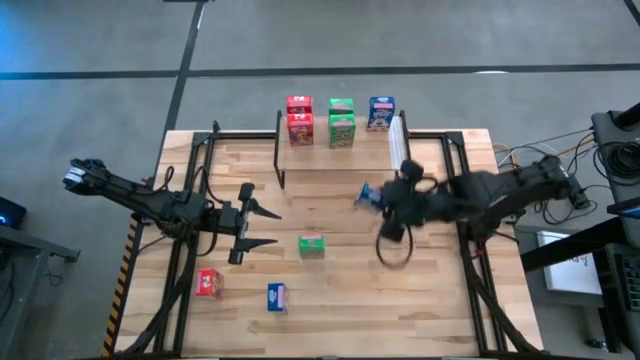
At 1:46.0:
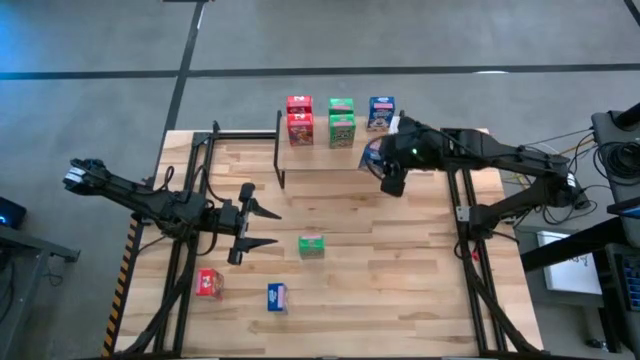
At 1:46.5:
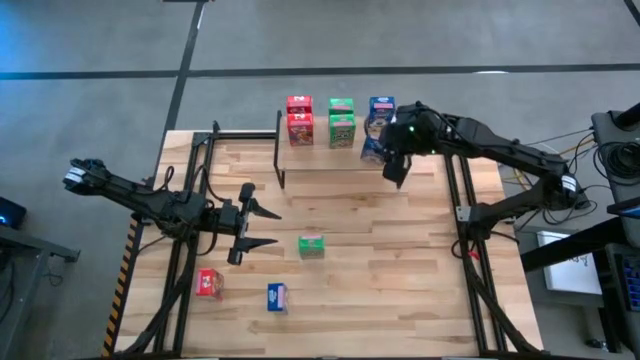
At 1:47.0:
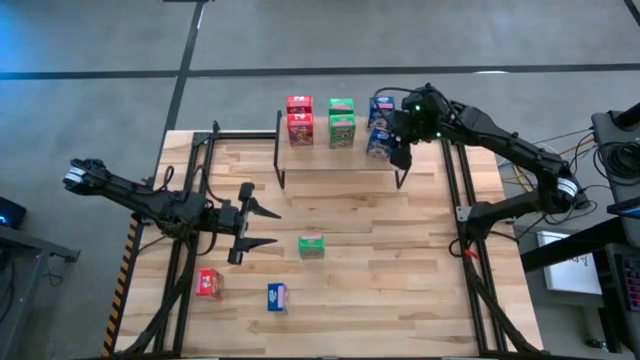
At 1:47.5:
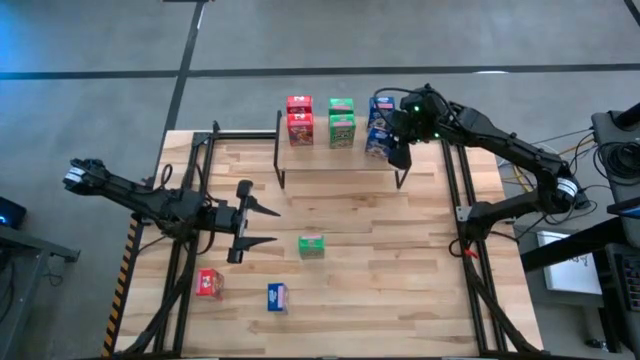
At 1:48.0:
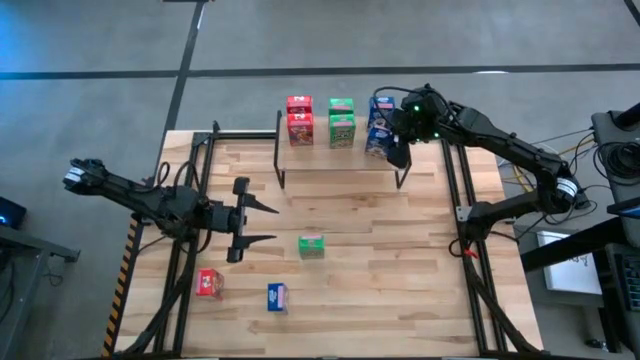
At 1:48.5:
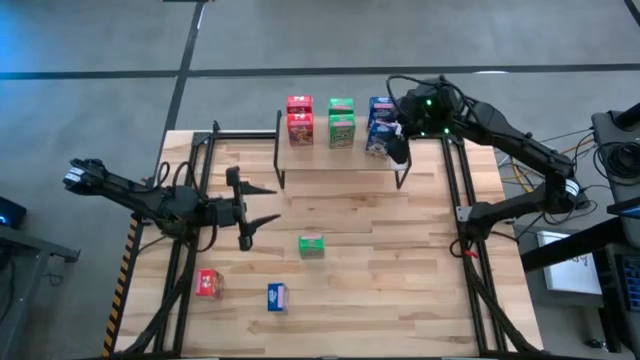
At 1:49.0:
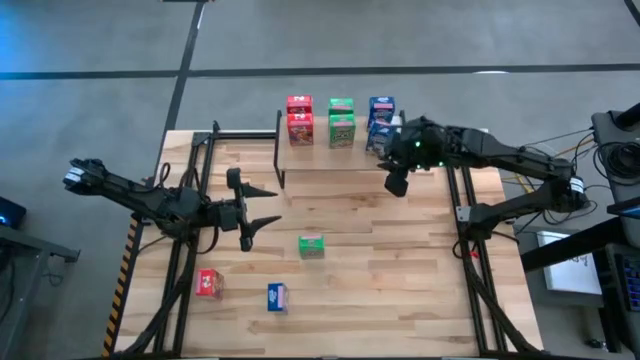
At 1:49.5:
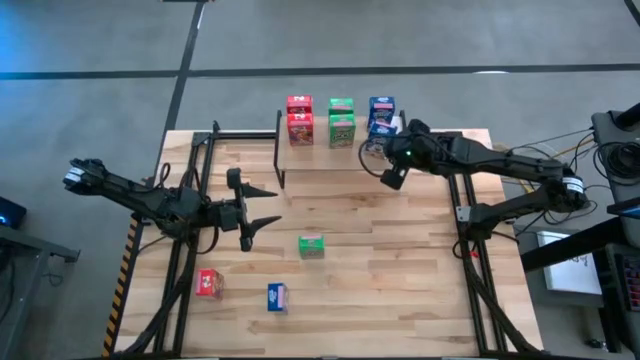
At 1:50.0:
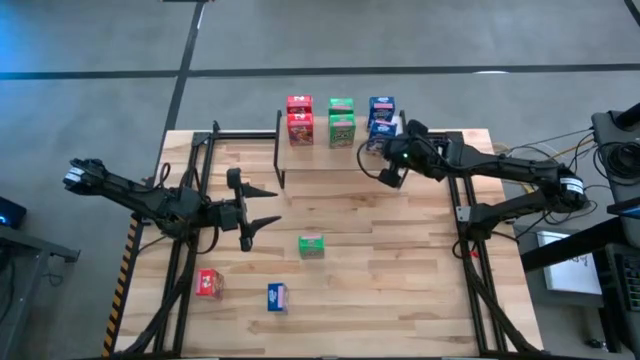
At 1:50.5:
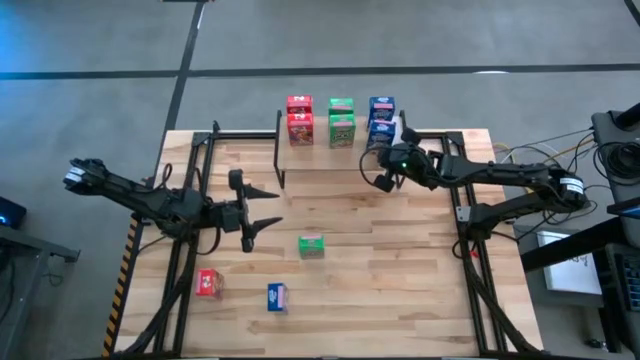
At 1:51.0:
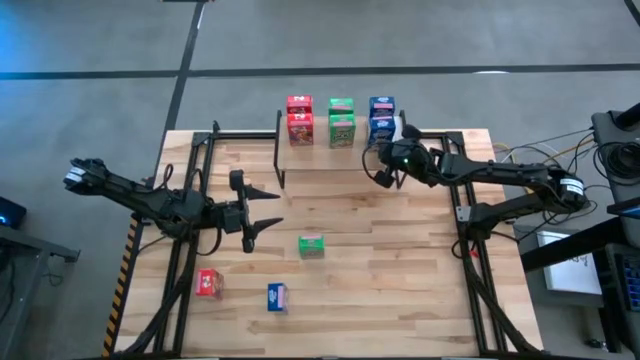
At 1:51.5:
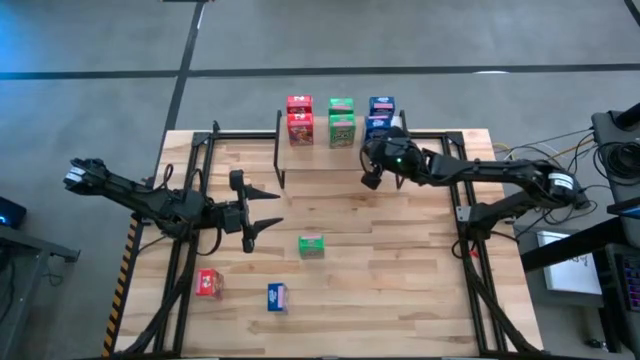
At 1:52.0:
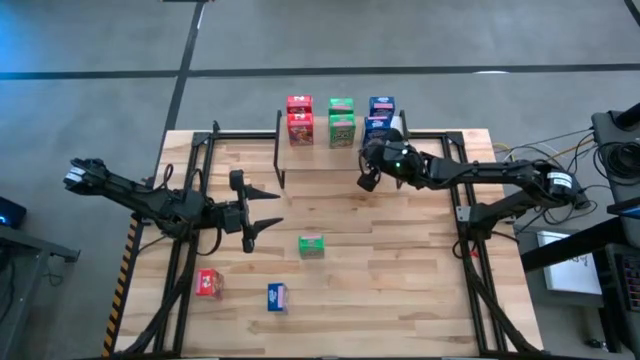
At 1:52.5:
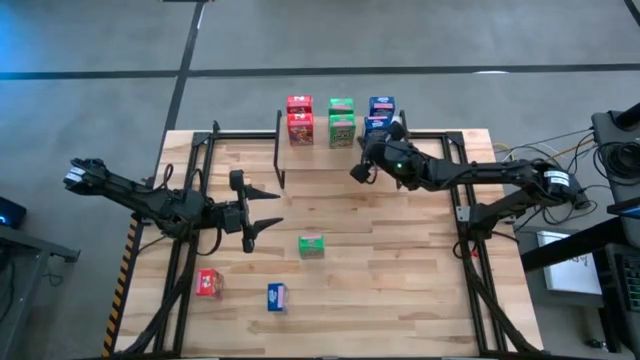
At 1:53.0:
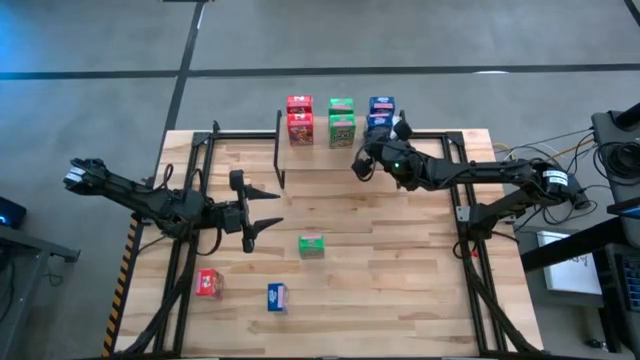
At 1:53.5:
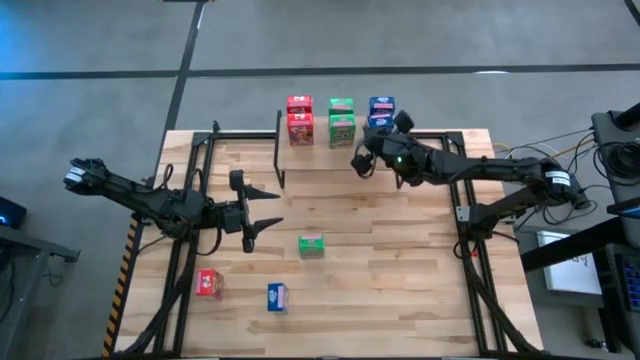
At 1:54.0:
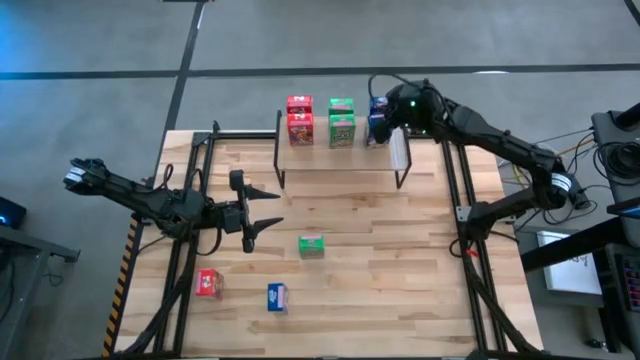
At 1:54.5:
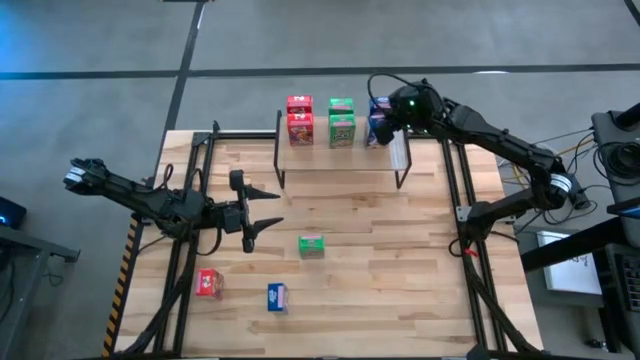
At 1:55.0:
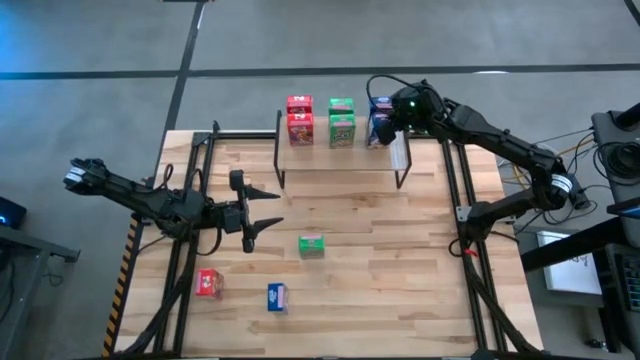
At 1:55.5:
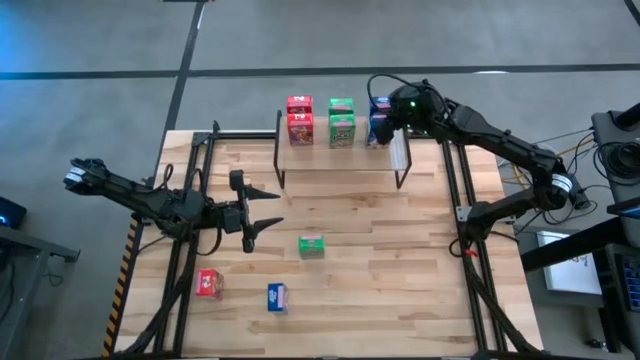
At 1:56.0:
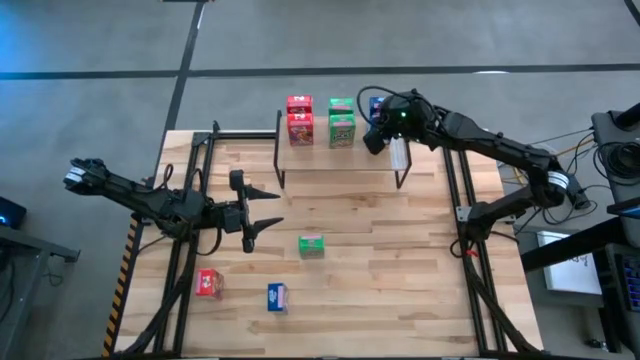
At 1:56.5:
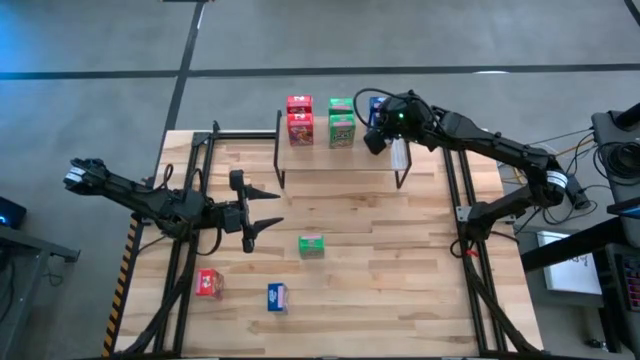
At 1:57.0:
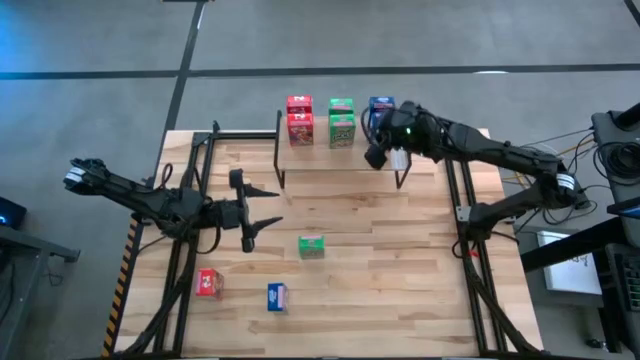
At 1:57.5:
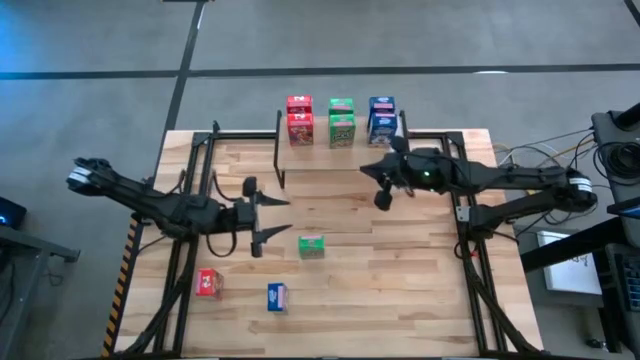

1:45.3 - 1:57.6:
Task: Stack cereal on shelf
Put the right blue cereal box on the shelf

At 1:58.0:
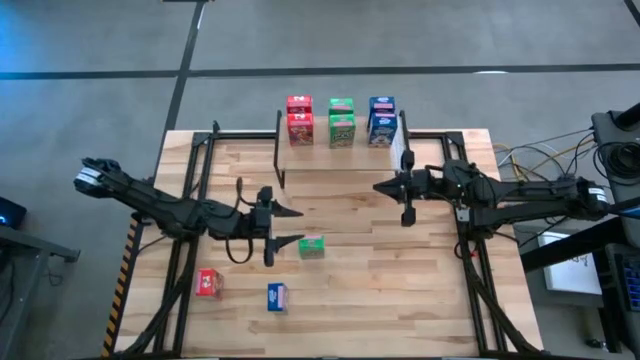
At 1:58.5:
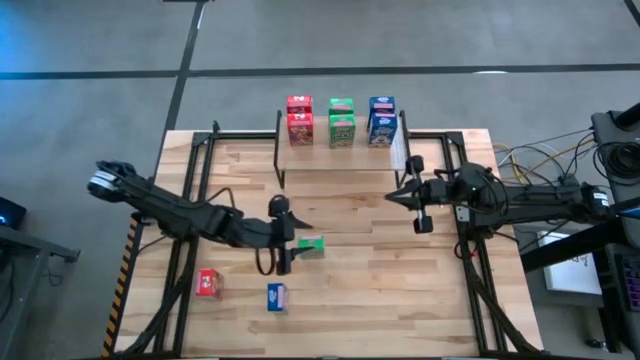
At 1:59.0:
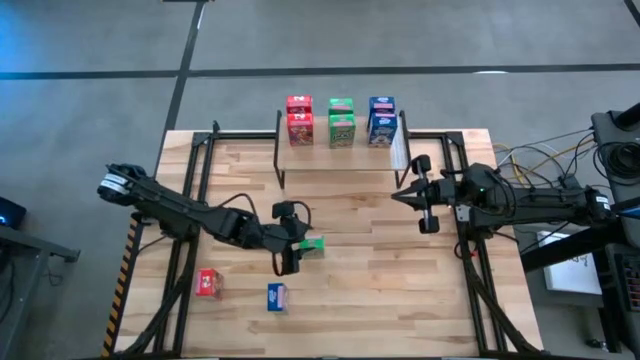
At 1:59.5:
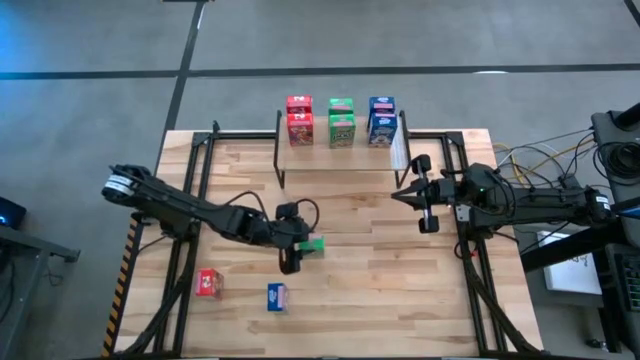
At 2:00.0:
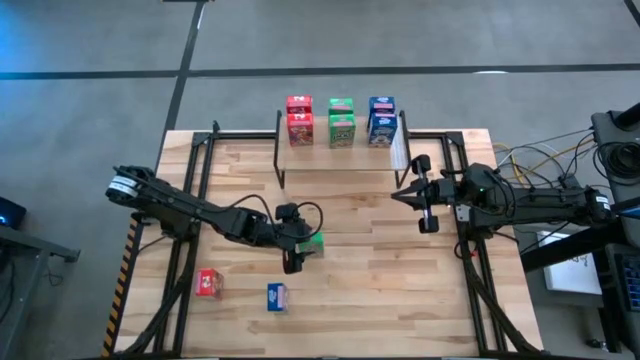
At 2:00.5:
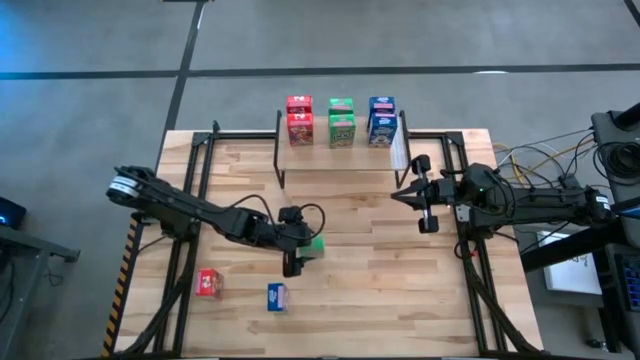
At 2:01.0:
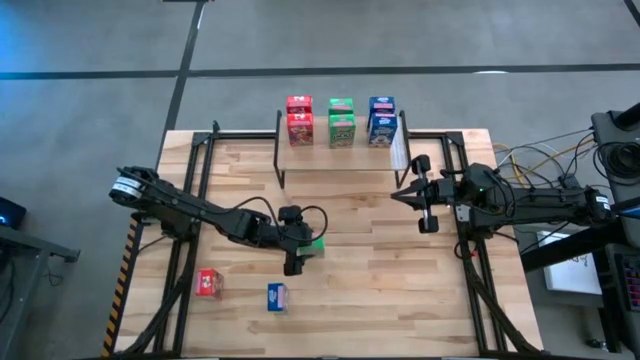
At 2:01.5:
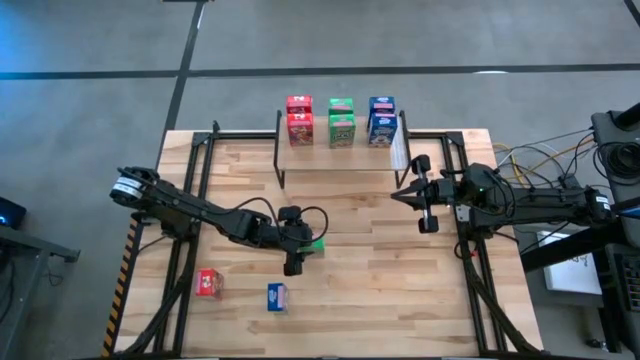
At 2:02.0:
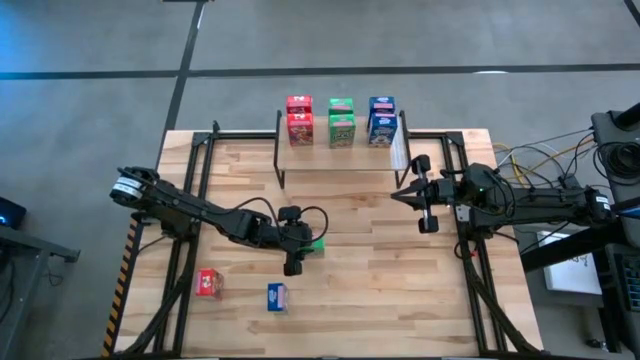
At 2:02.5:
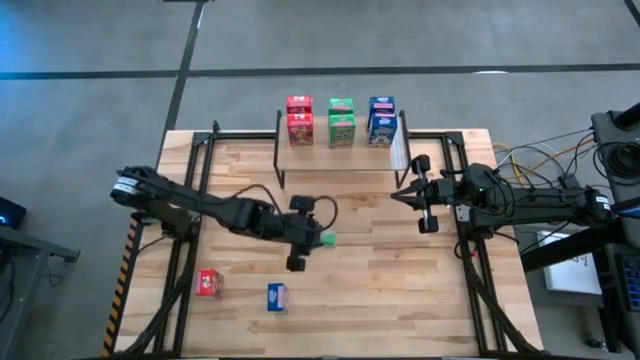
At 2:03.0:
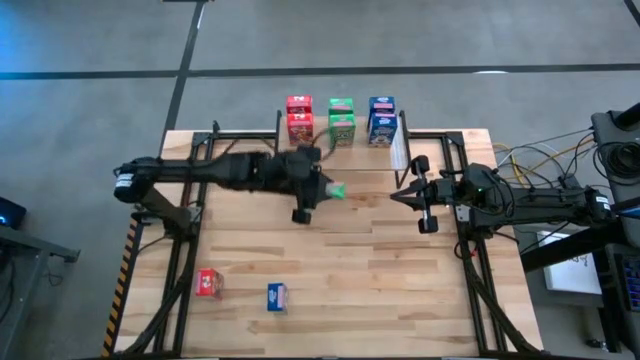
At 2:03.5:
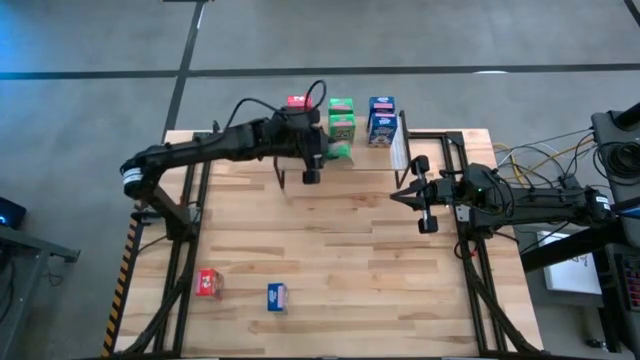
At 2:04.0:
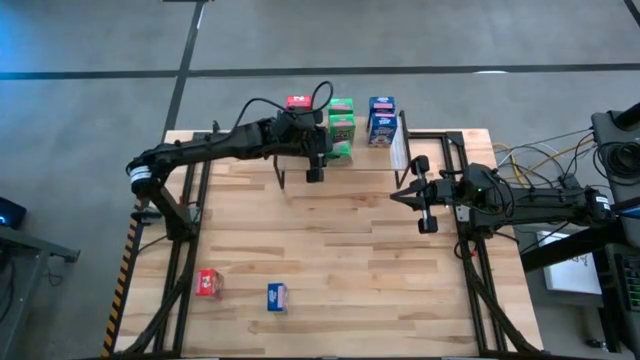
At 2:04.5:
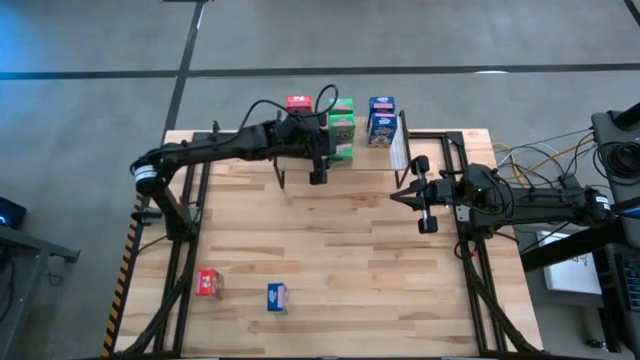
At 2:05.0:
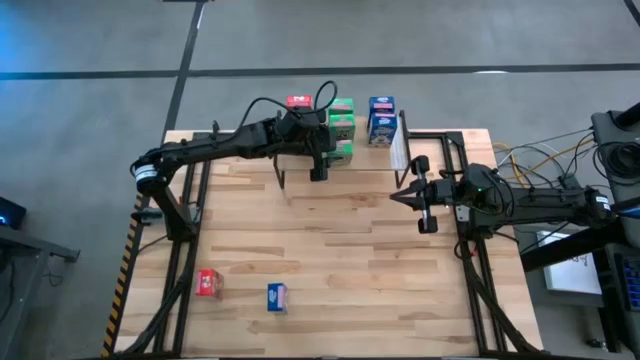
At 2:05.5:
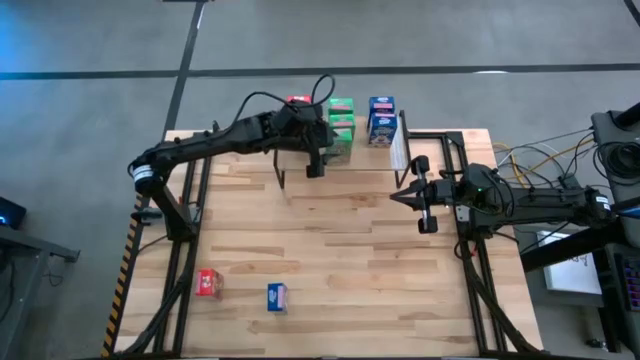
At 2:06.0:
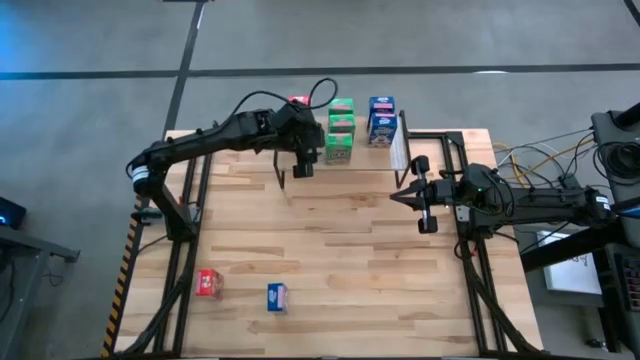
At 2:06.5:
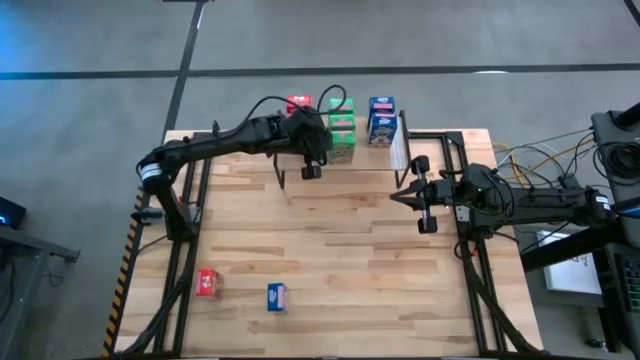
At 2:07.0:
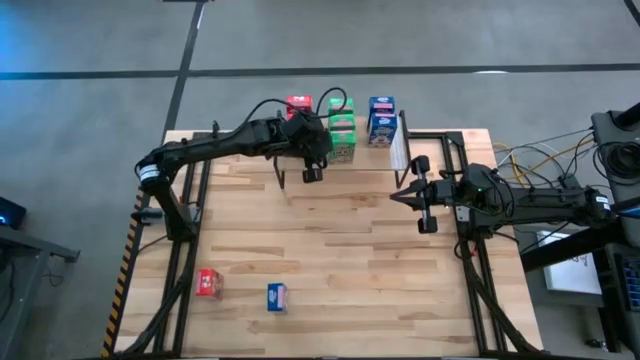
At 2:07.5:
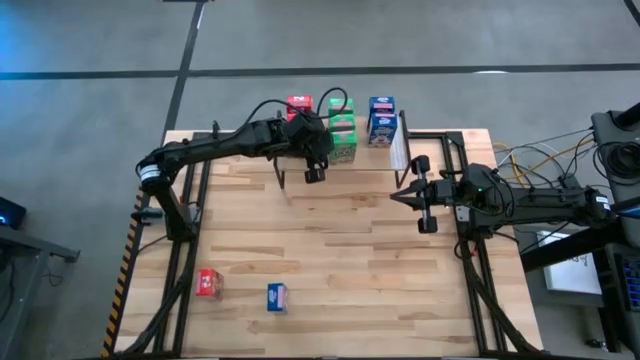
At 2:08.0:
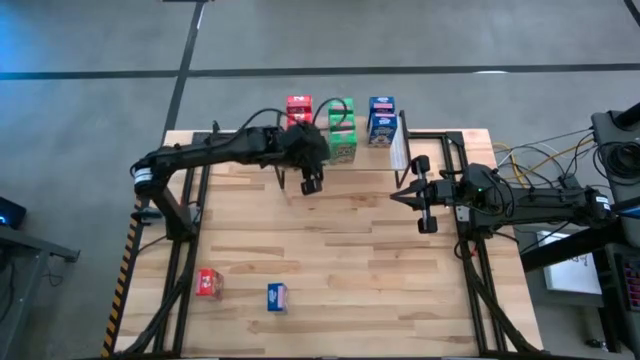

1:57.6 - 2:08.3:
Put the green cereal box on the shelf
